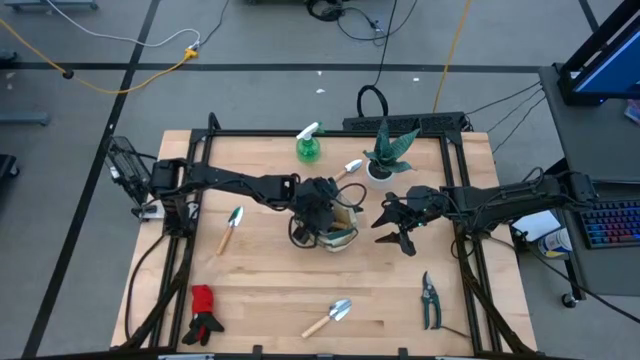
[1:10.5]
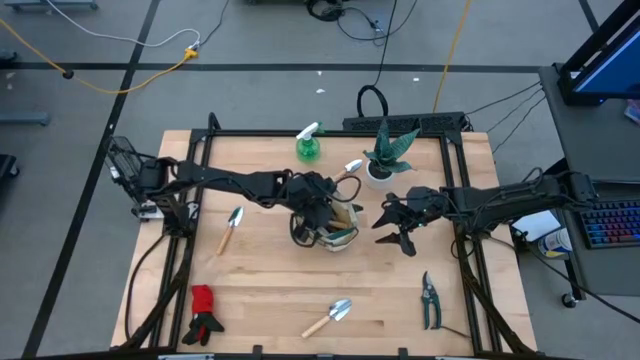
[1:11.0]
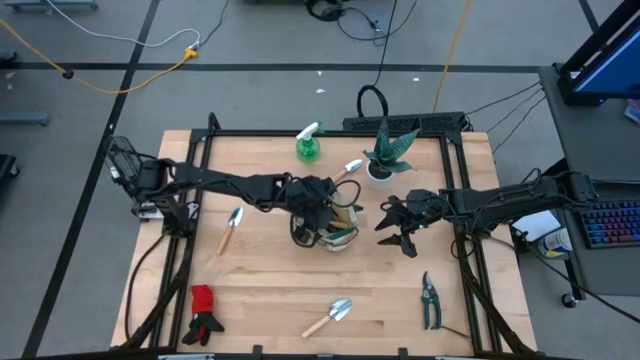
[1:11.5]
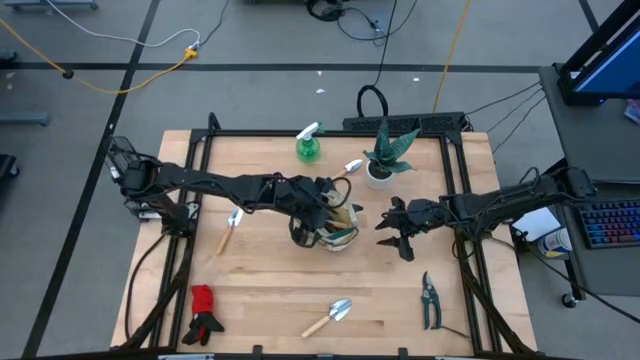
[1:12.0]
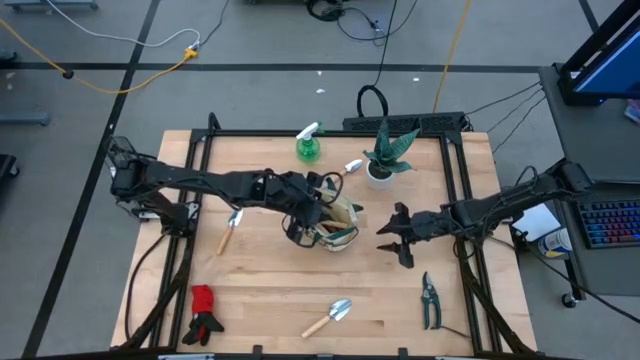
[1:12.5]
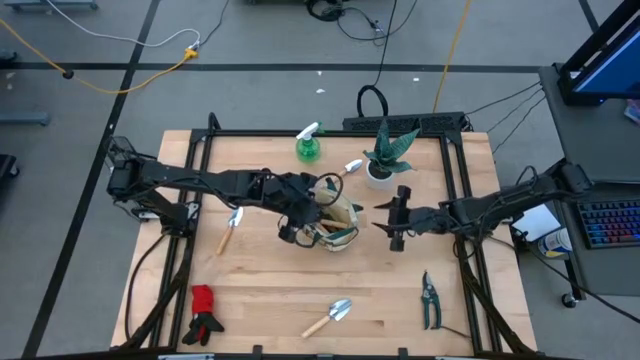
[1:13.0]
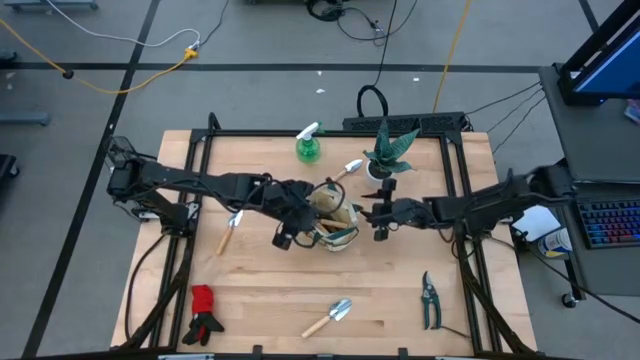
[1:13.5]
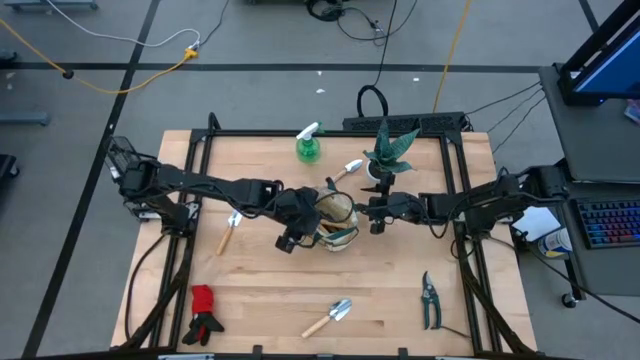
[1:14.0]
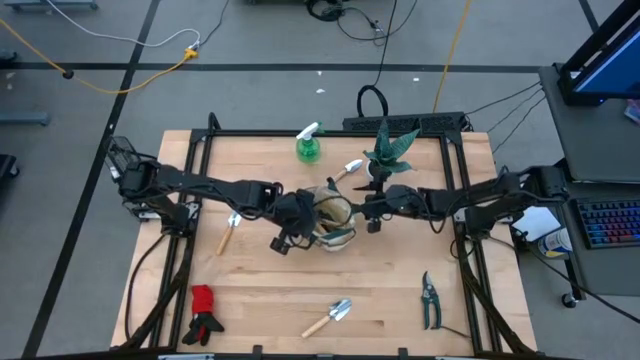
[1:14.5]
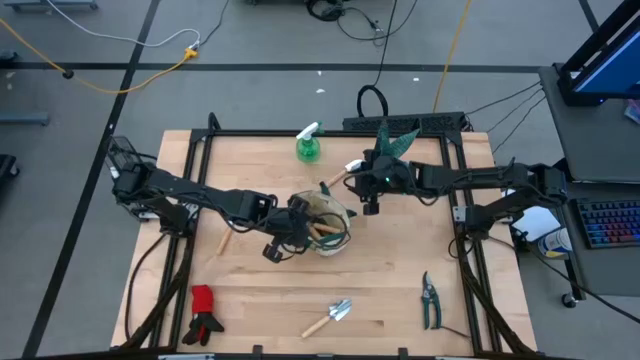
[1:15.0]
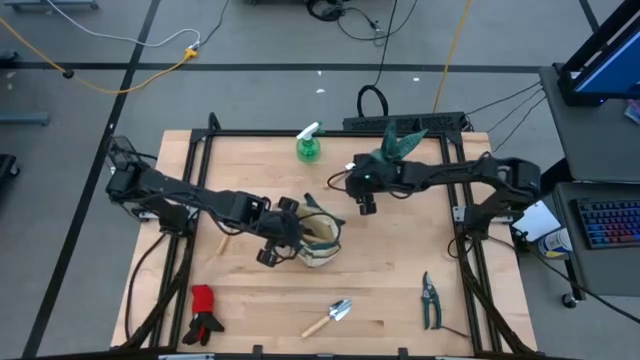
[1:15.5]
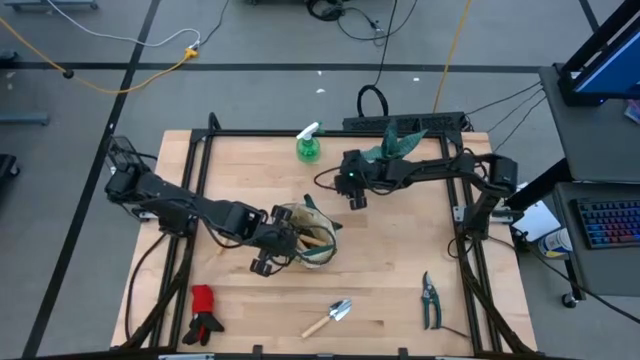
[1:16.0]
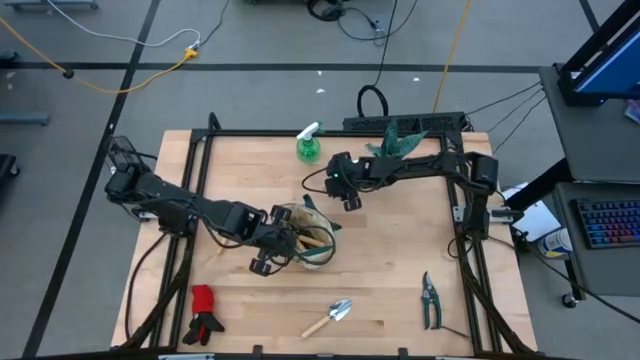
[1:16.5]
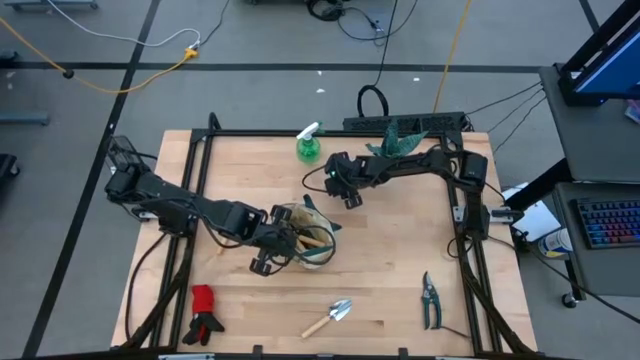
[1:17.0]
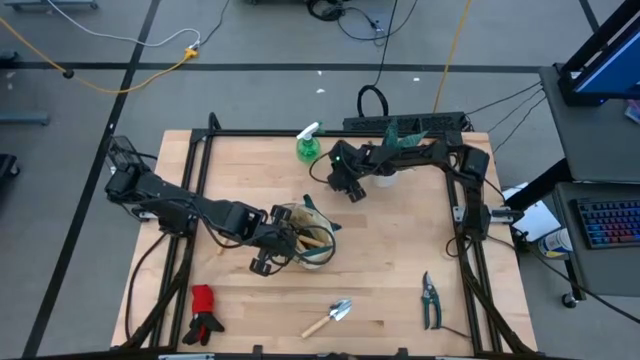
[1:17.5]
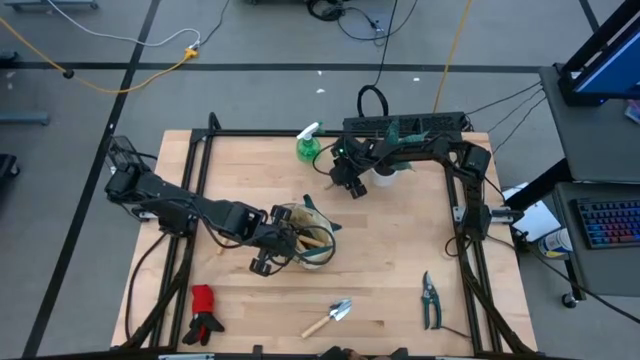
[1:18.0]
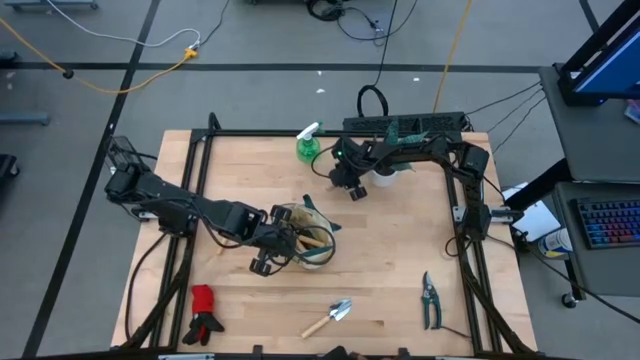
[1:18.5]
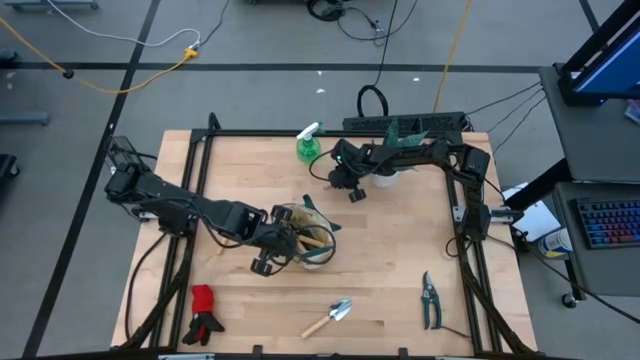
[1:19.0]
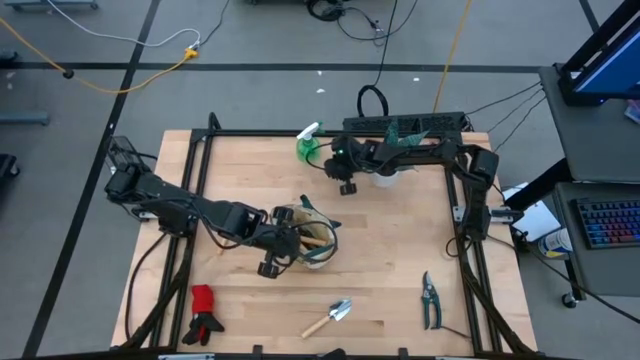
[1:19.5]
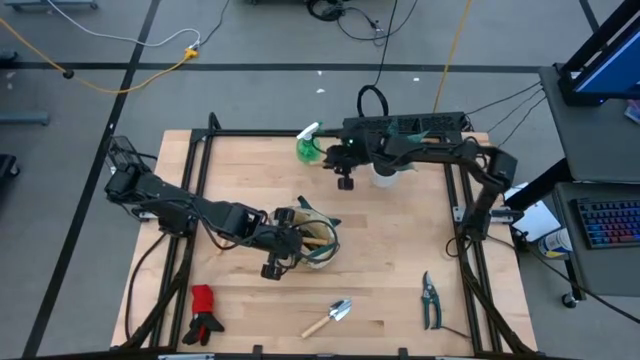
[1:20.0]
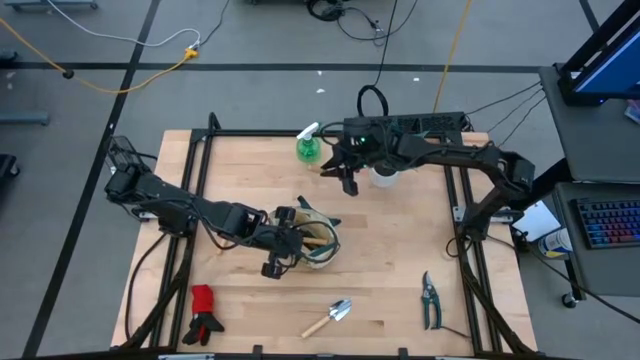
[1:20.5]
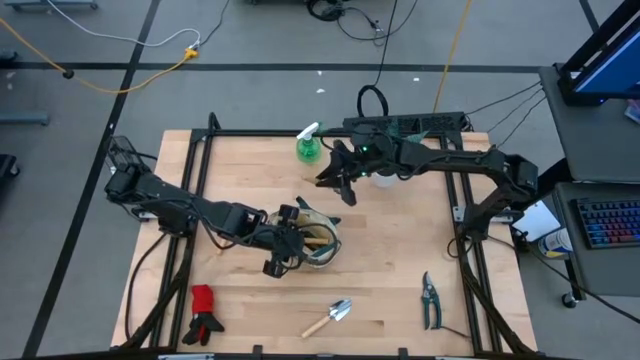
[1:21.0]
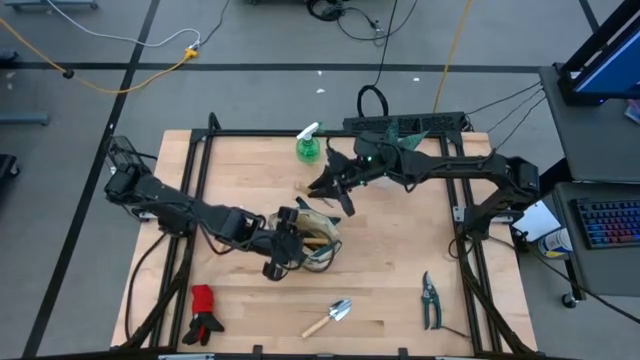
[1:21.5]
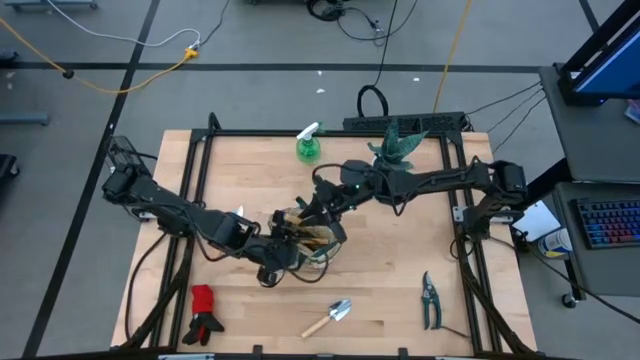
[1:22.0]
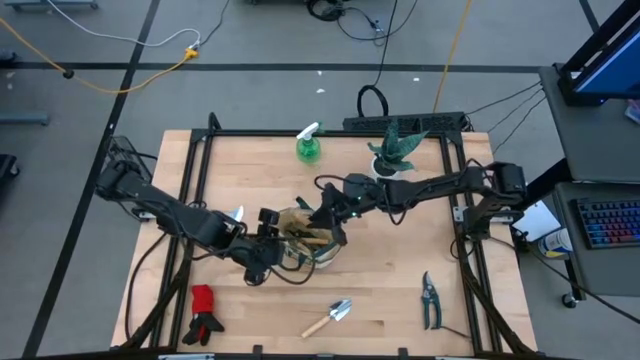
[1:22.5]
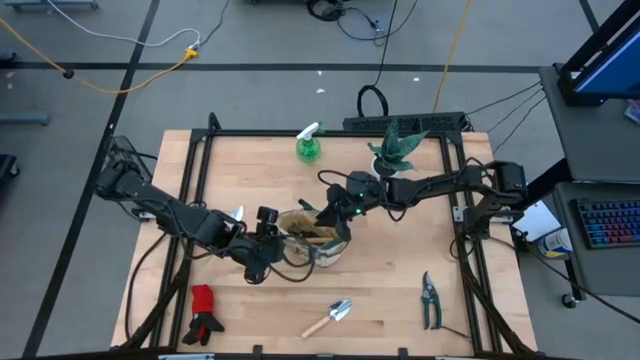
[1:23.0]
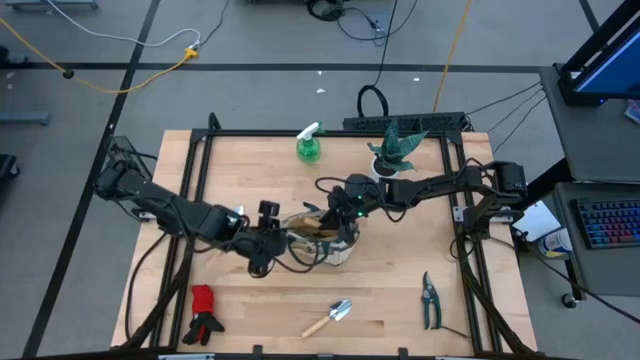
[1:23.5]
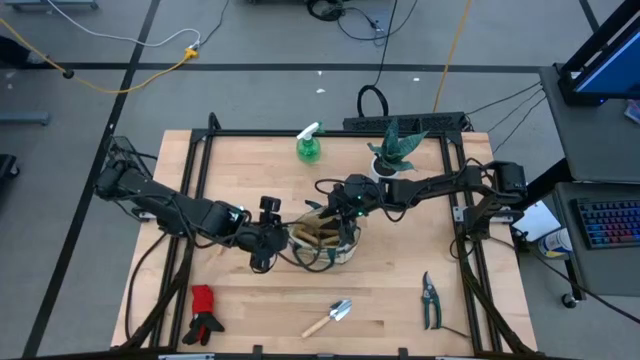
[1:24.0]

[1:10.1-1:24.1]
Task: Pick & Place Garden tools in Gardening bag
Put the top brown trowel into the gardening bag

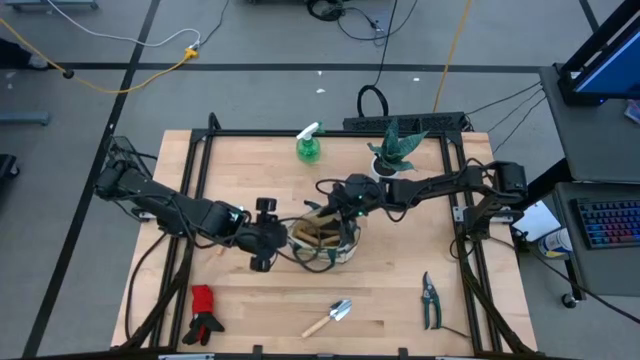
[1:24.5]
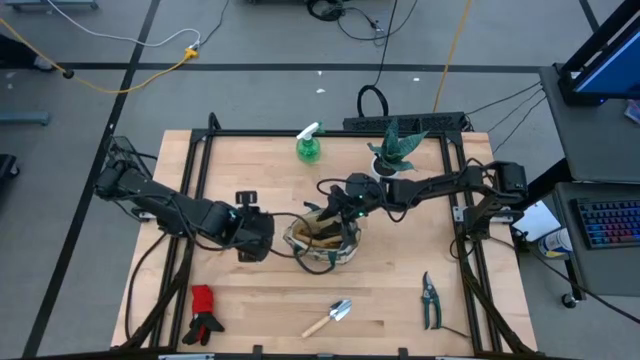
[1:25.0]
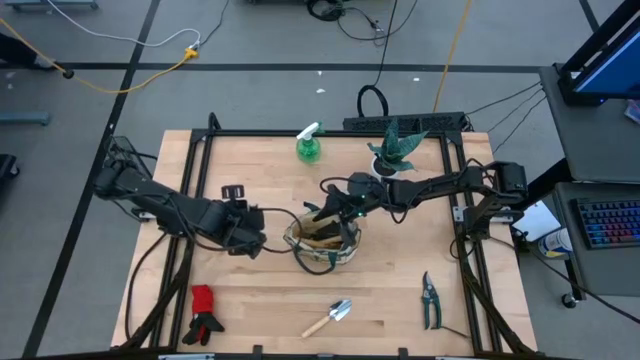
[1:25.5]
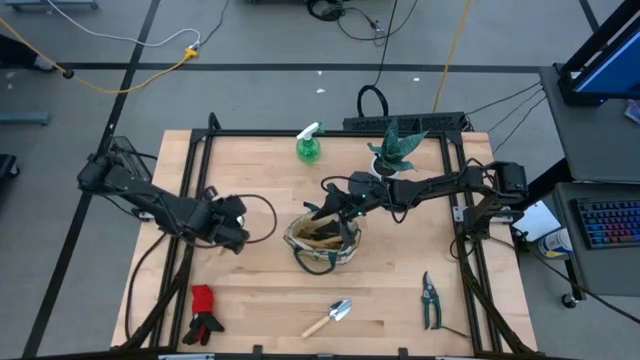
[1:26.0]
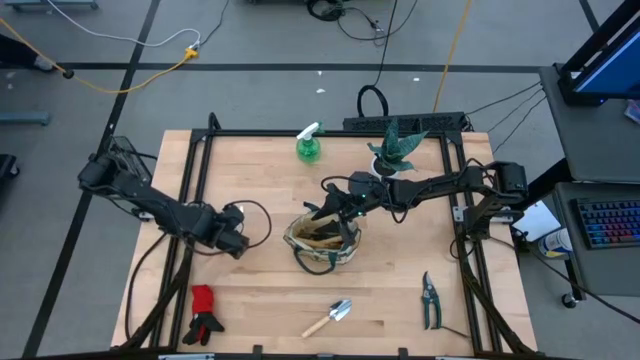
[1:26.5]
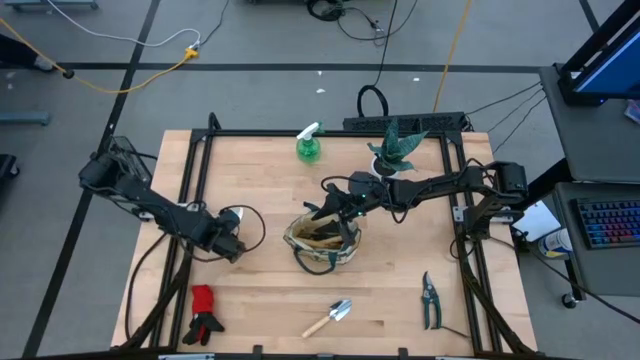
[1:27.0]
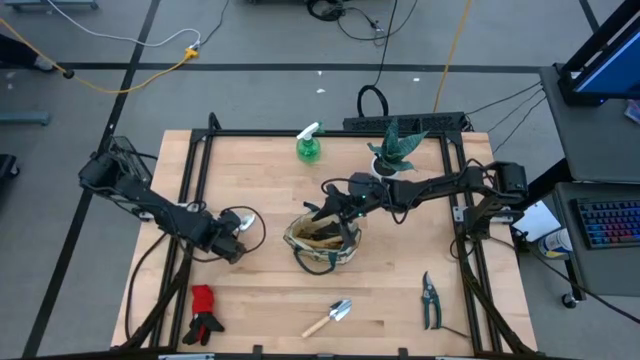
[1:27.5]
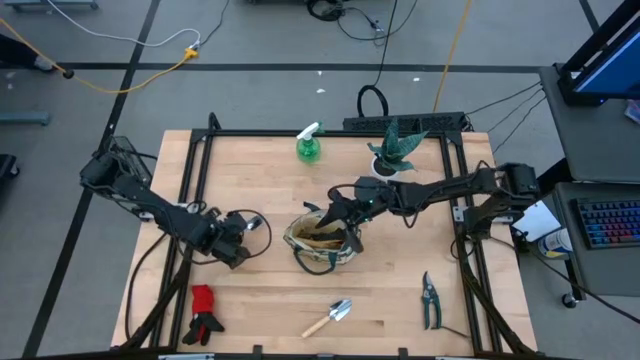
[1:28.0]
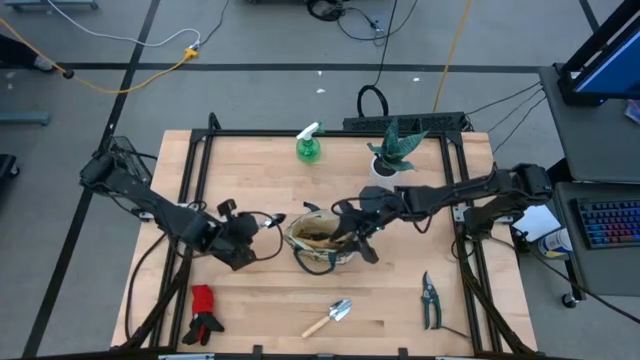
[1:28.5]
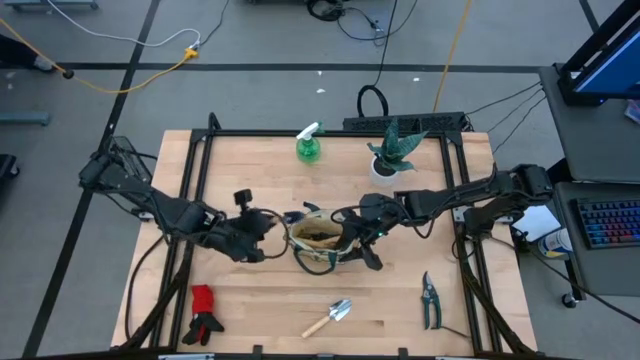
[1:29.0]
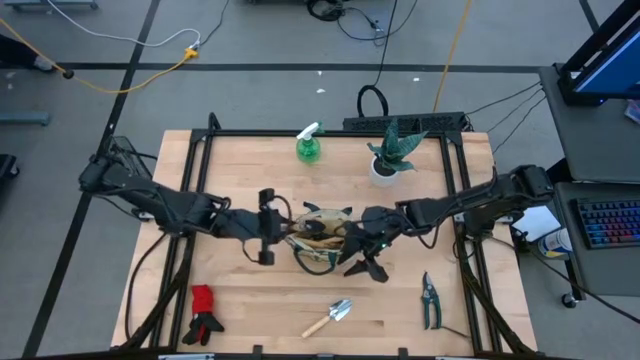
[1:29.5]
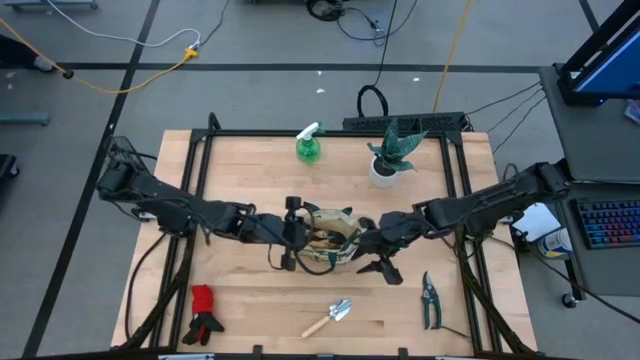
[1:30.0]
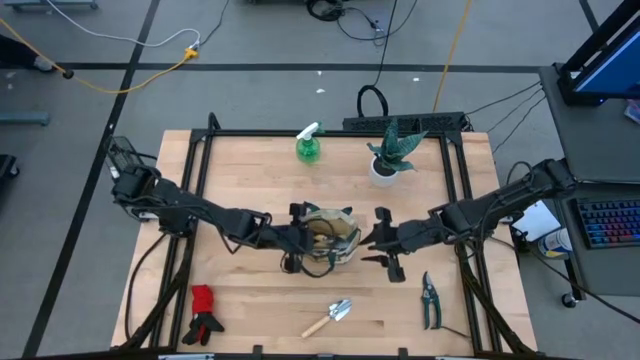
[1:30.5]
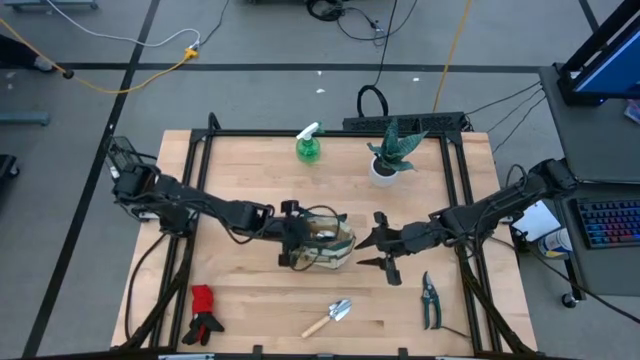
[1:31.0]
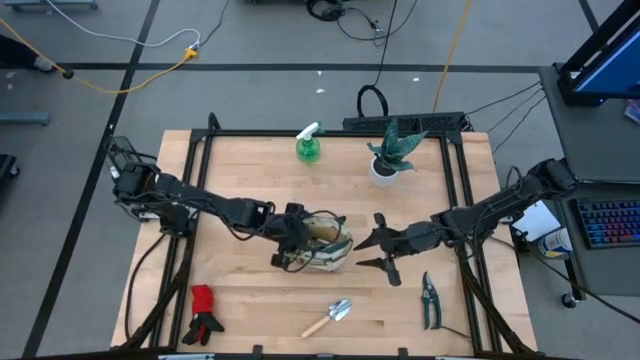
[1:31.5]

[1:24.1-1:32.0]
Put the top brown trowel into the gardening bag

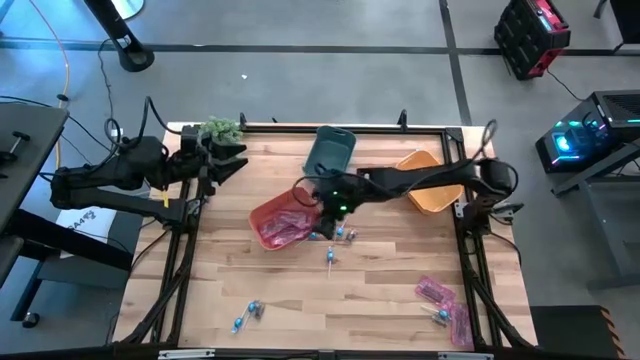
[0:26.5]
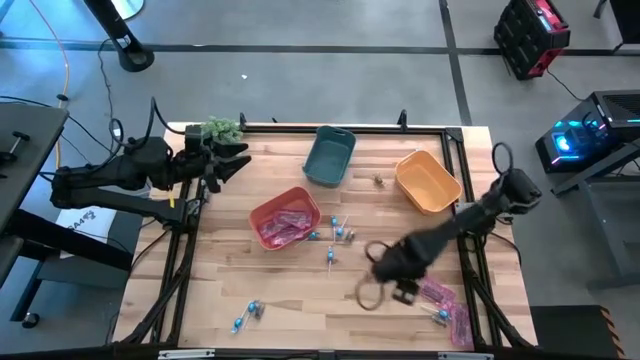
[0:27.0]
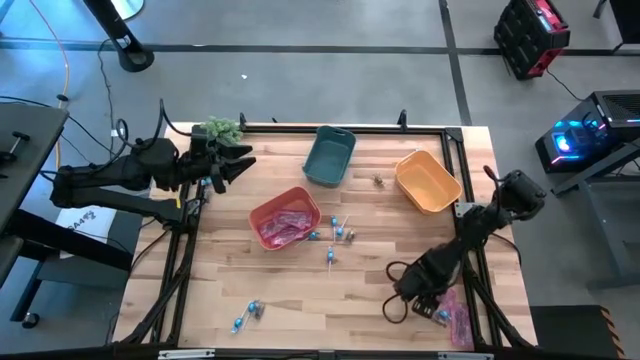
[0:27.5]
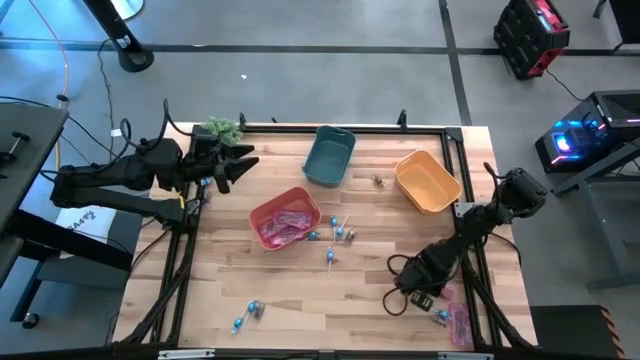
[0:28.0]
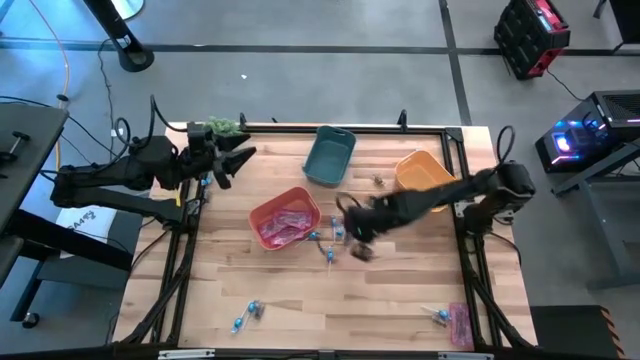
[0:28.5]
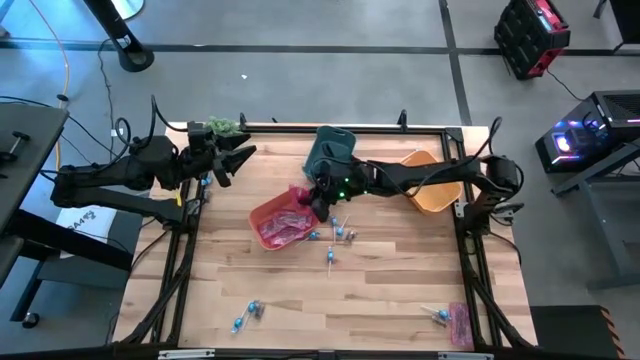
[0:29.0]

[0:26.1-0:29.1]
Task: Sort candy
Put the red candy into the orange bin
